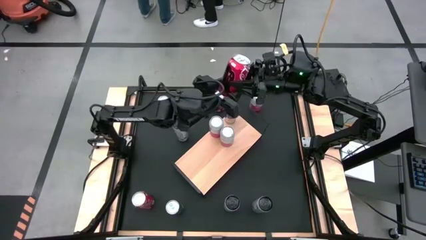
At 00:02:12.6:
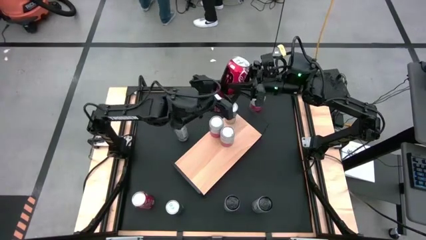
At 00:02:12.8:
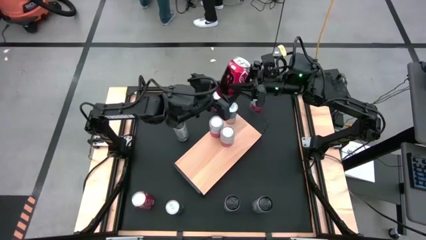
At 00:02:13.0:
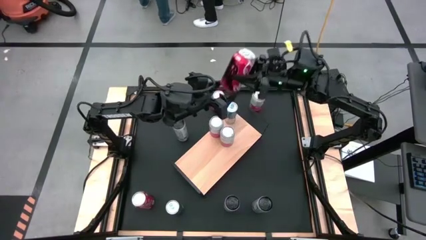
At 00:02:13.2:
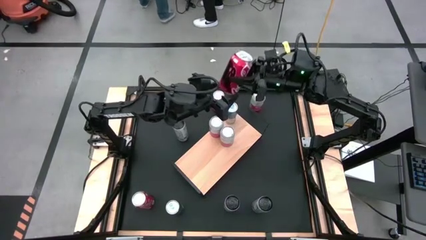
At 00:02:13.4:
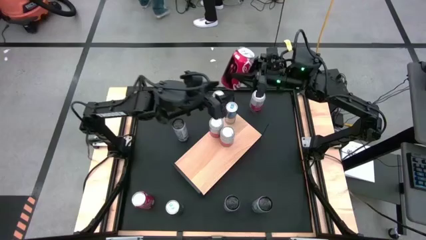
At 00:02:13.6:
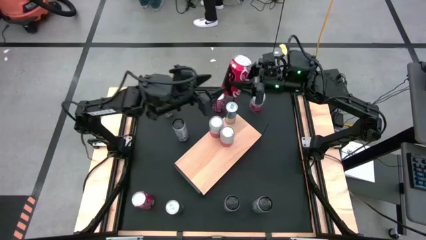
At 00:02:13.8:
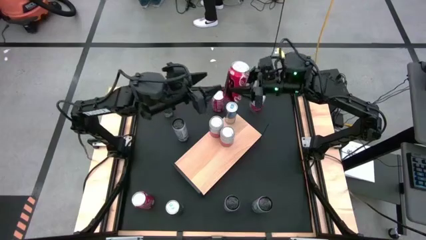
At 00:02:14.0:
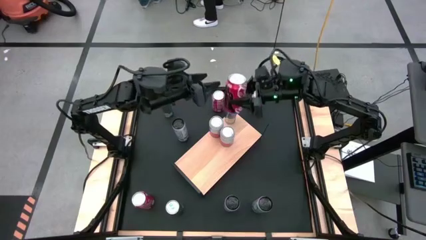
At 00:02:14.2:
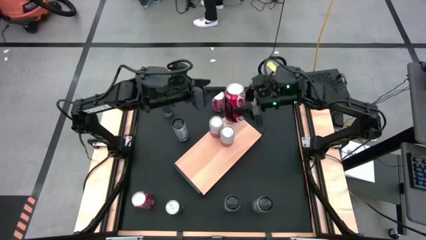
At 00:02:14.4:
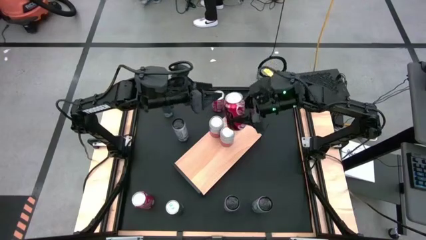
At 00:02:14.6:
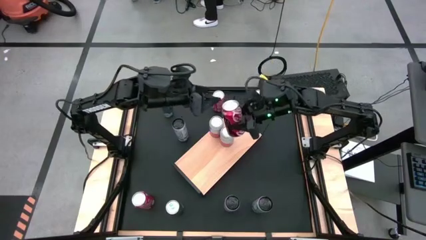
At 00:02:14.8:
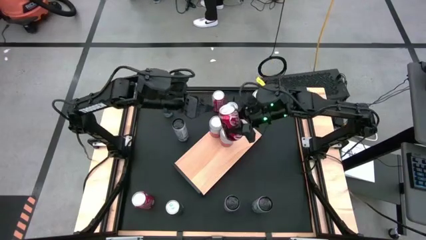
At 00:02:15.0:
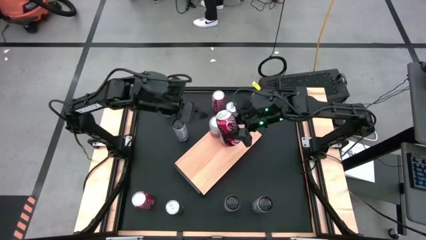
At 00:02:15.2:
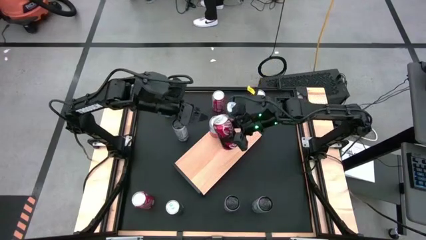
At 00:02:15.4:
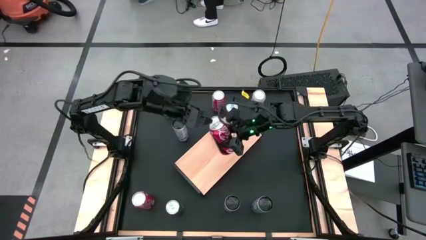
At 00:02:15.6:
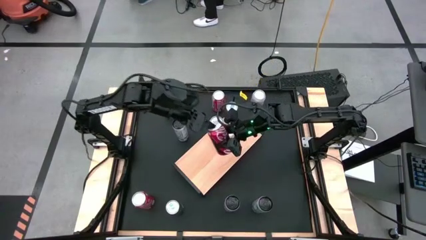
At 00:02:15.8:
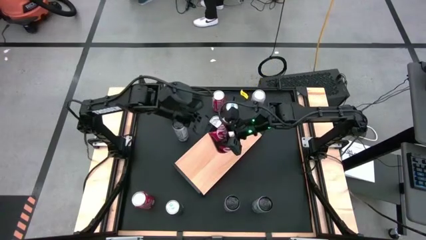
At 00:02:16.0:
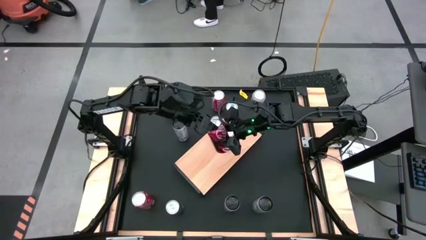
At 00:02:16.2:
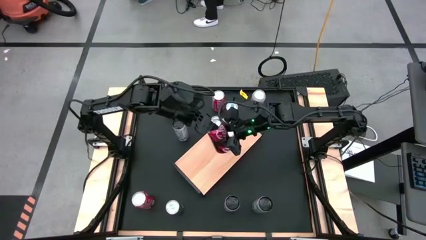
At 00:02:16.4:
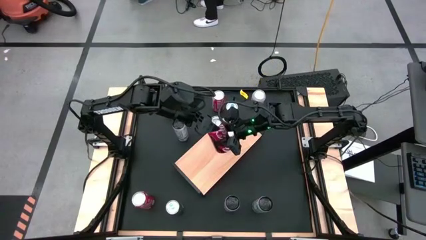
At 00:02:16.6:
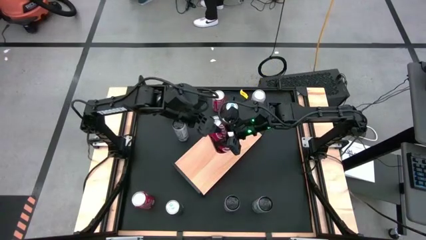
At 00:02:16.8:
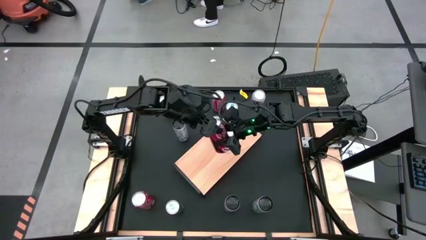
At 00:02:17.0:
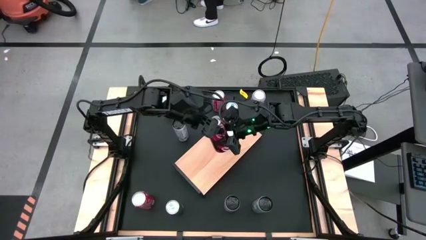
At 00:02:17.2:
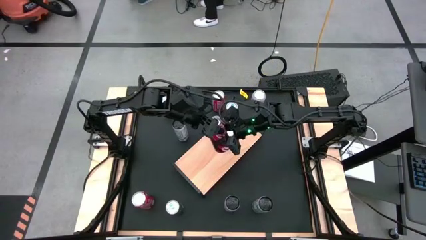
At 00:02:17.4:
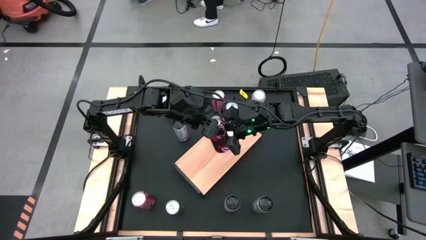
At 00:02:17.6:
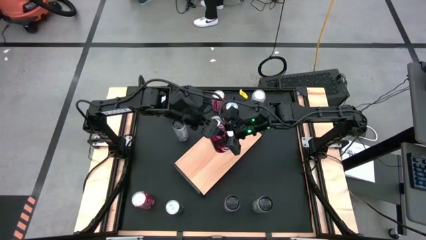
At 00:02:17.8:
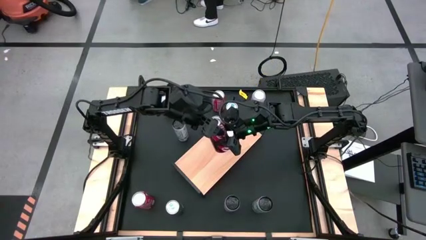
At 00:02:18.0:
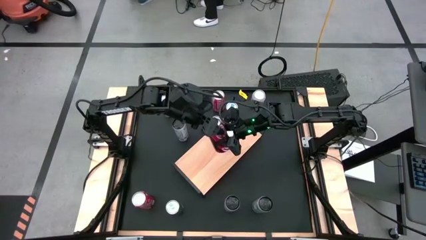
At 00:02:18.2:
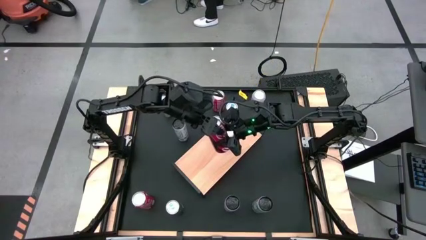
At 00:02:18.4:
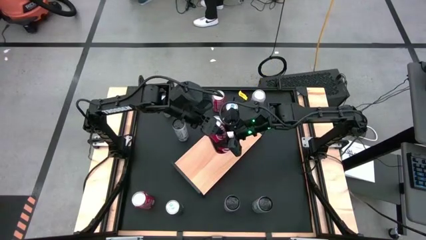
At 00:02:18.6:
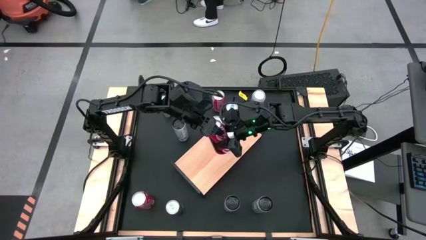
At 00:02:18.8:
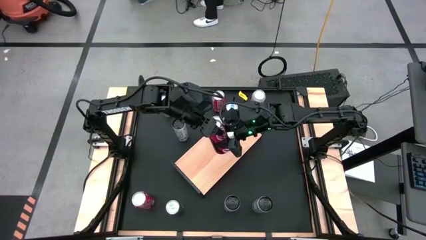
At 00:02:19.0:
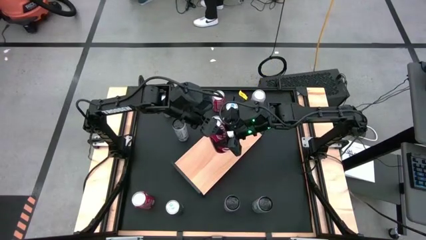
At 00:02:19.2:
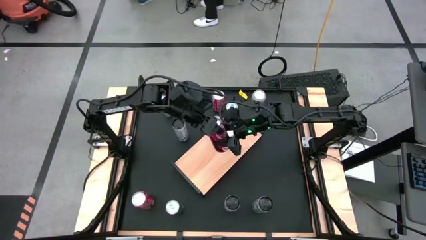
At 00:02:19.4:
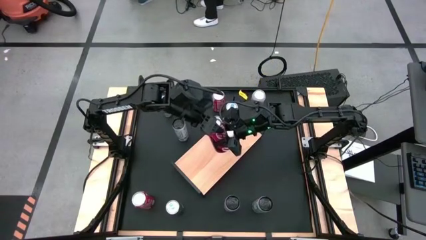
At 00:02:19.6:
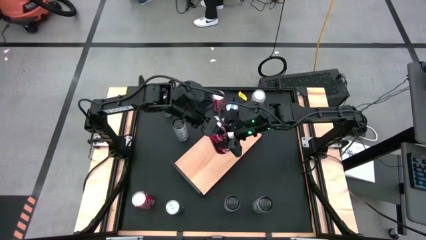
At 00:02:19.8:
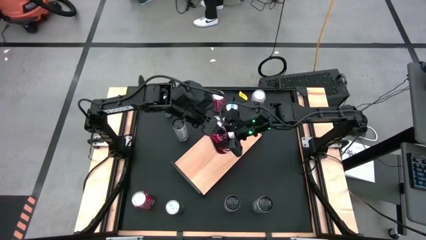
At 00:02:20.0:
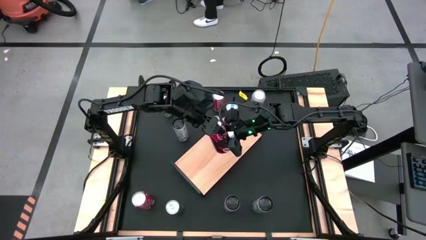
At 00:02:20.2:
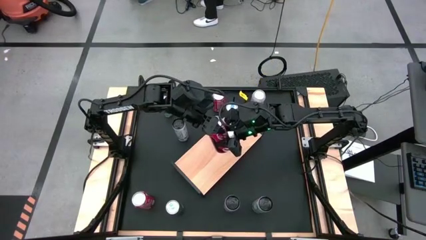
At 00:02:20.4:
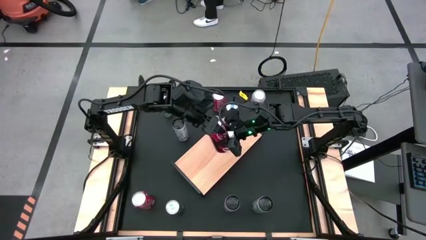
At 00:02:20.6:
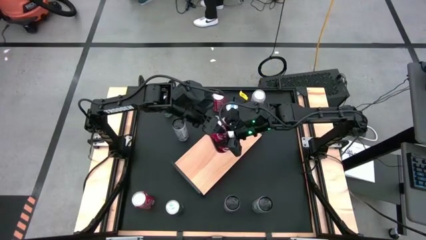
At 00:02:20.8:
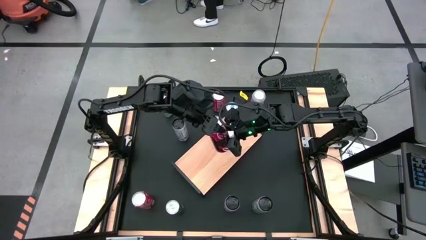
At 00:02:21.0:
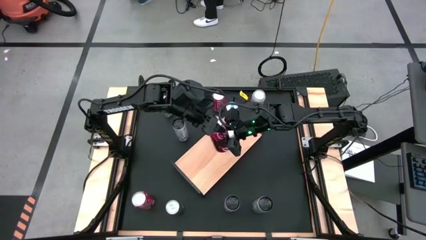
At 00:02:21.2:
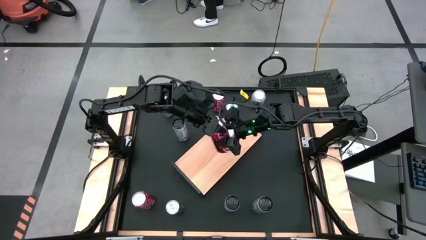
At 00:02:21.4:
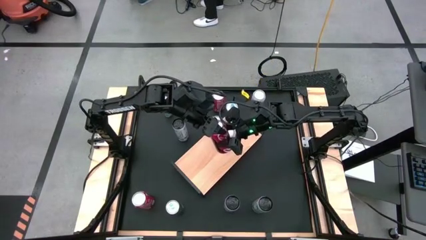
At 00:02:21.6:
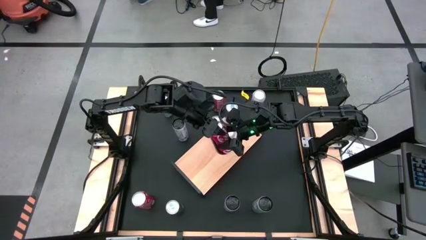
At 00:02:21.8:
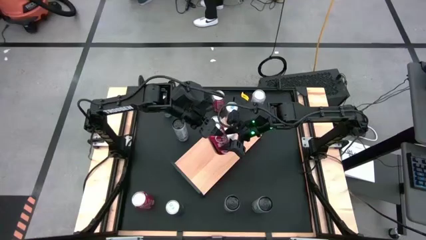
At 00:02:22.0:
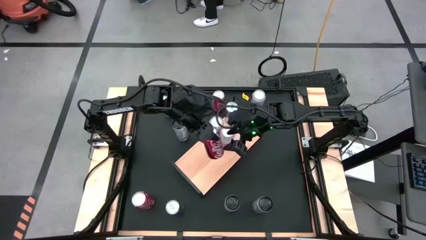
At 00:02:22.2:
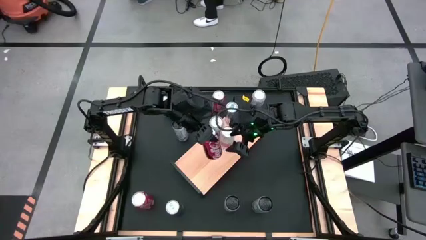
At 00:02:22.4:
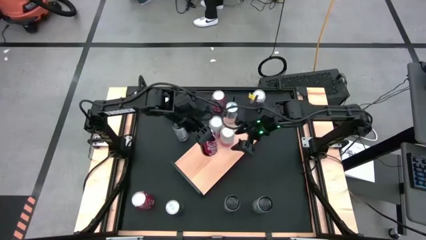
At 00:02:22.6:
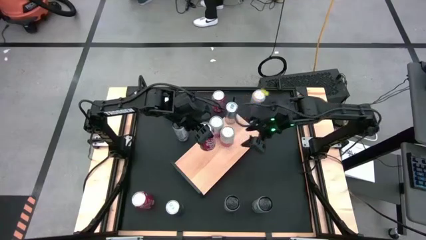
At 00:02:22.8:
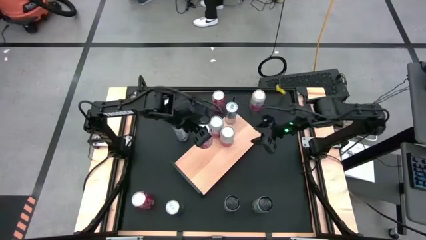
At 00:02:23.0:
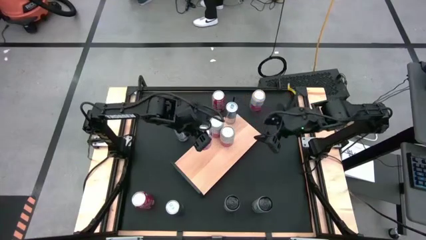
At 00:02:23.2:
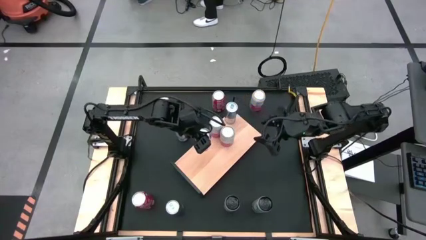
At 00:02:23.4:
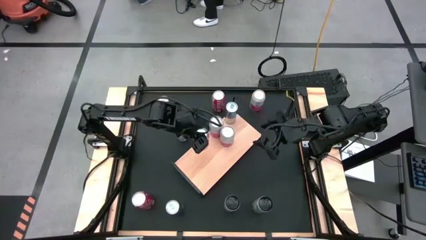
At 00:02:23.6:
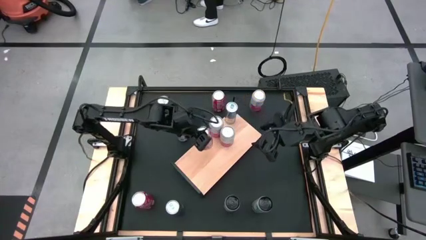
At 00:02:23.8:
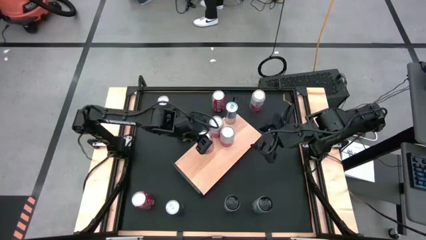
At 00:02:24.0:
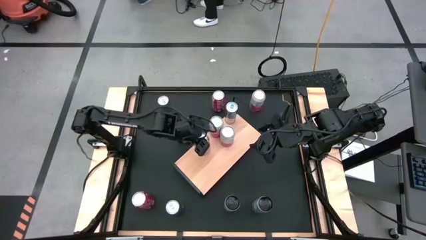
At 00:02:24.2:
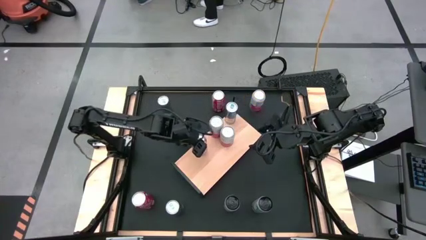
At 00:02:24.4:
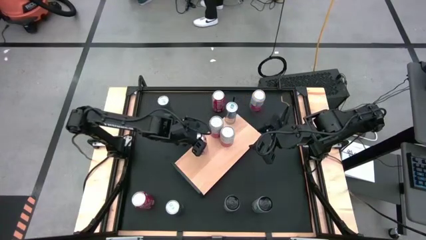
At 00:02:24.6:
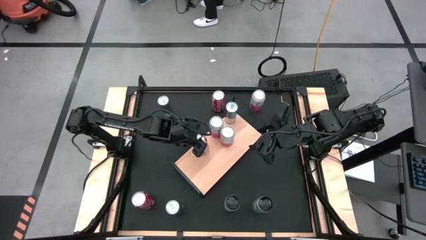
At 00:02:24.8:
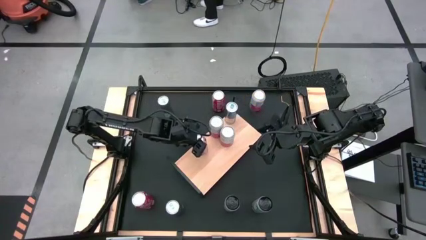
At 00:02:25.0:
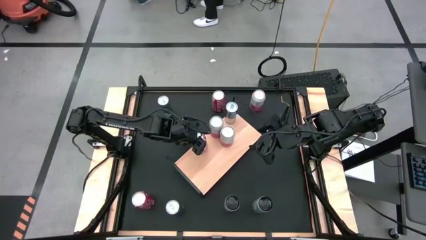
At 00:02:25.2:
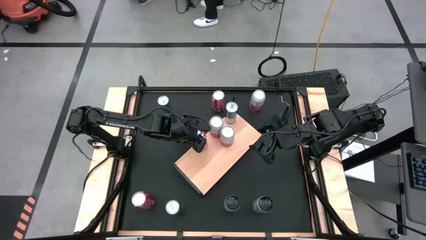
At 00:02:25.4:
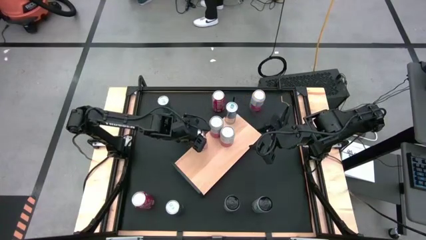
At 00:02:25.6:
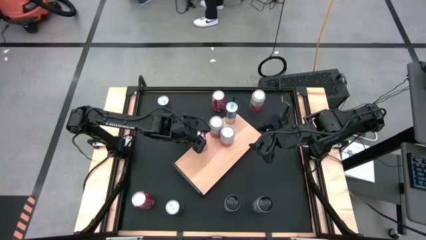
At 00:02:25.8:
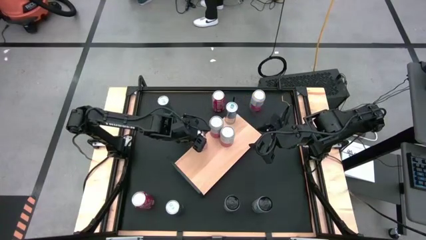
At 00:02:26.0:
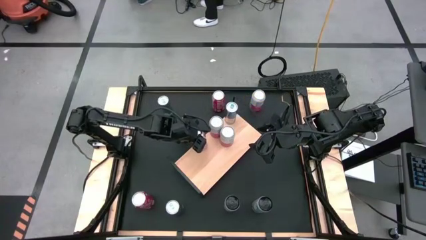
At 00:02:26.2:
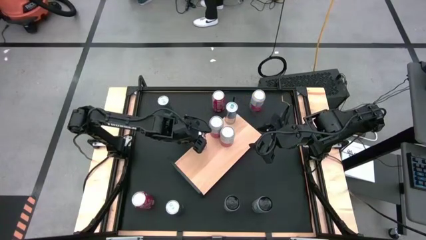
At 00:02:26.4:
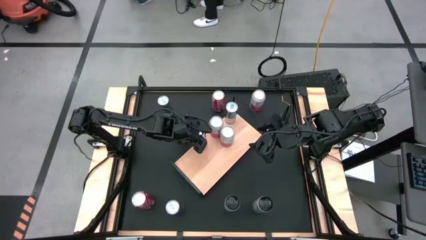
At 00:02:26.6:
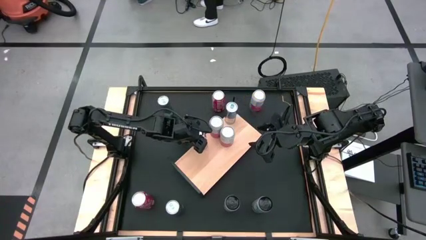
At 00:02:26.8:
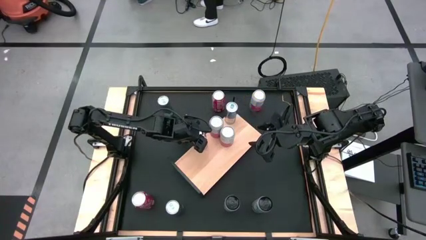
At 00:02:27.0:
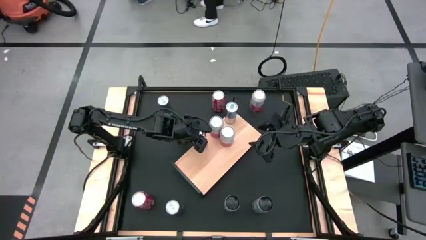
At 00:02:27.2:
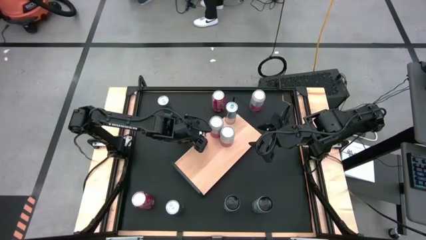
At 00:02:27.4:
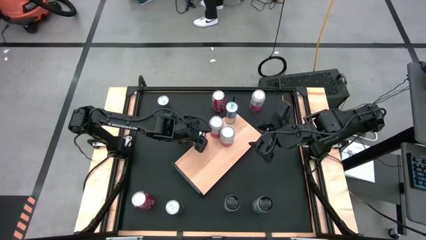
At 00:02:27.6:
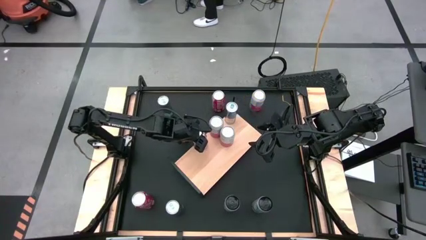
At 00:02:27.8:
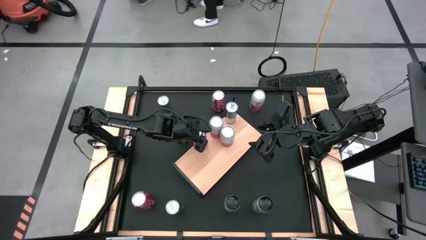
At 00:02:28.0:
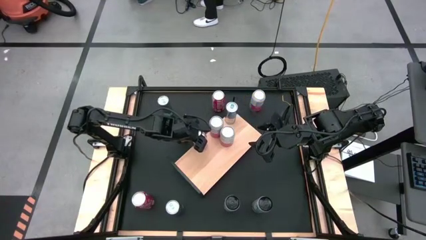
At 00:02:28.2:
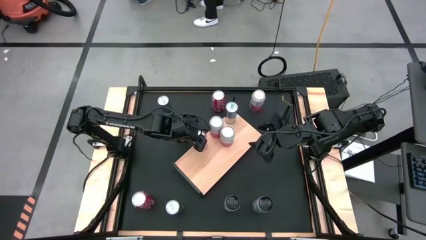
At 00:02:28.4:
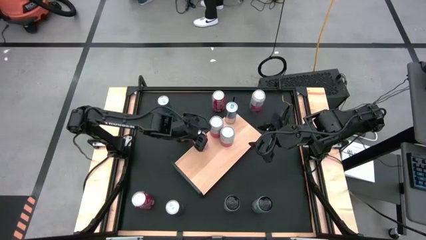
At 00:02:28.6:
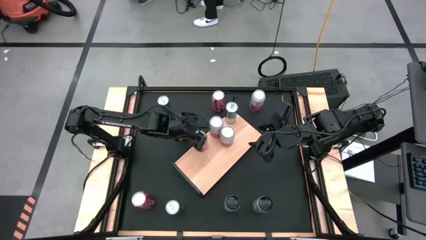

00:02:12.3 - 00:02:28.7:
Task: Place canned beverage on shelf
Put the top right red white soda can on the shelf
